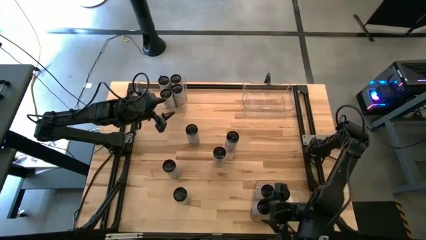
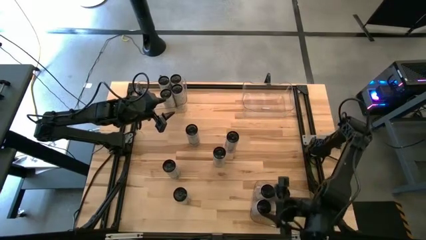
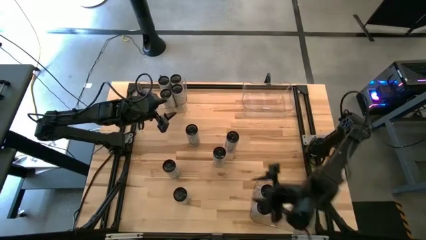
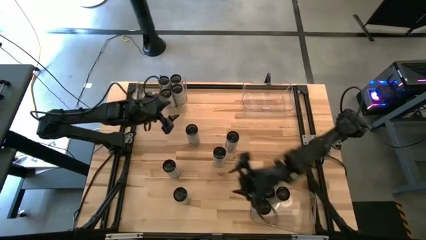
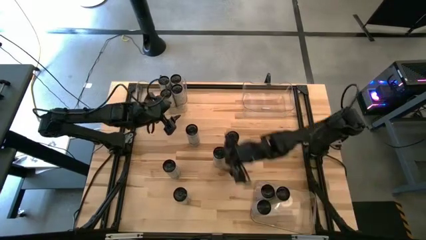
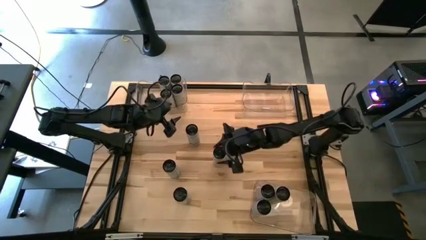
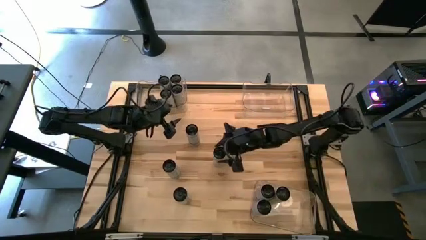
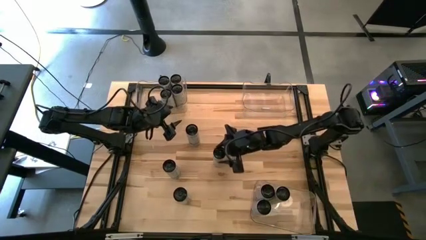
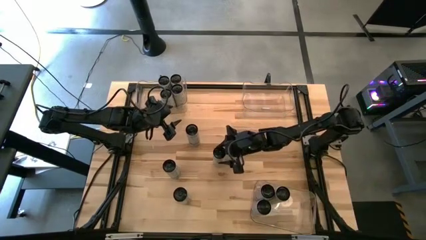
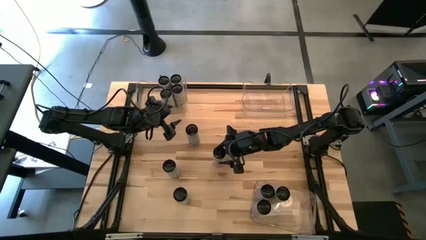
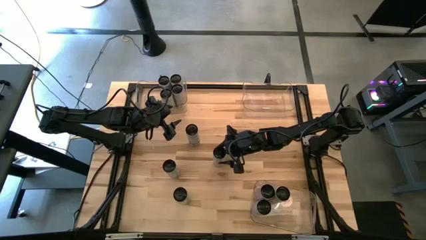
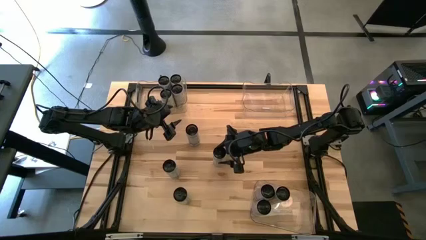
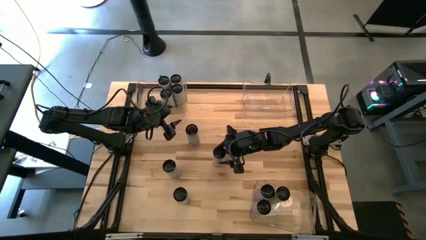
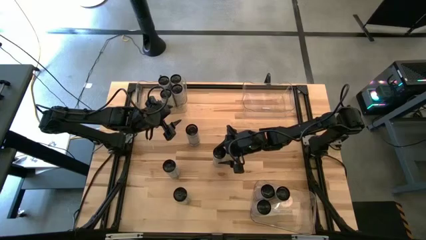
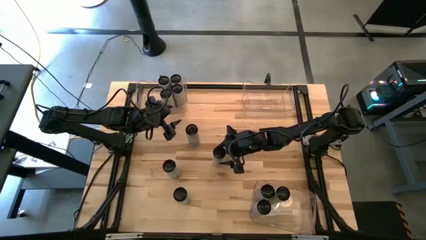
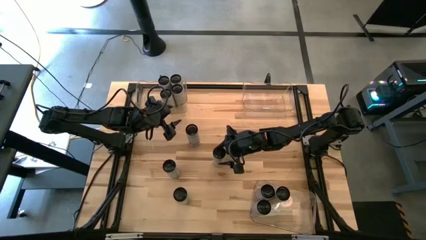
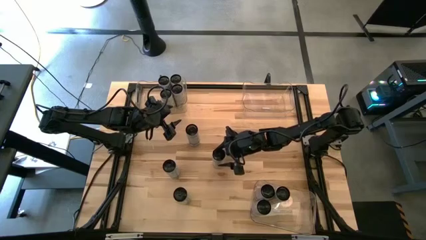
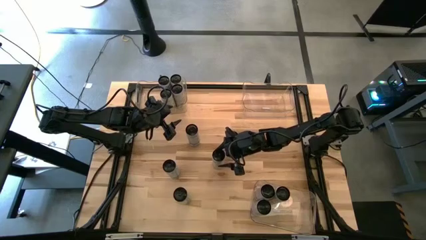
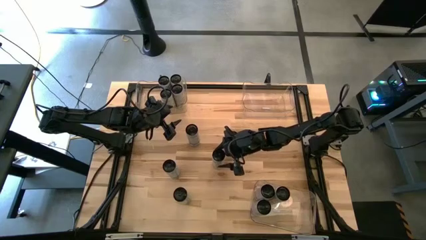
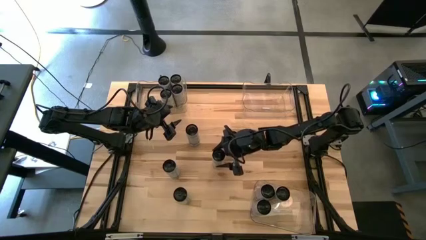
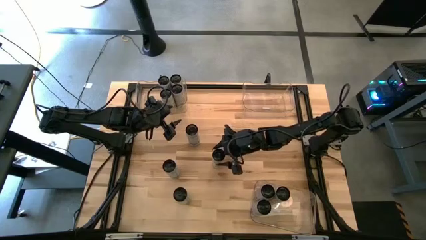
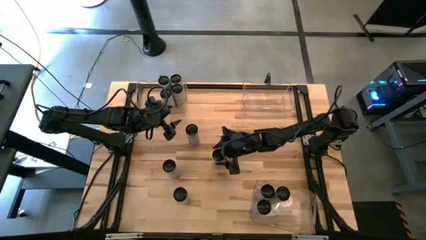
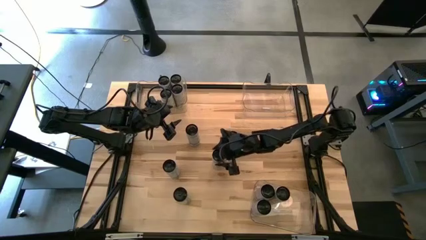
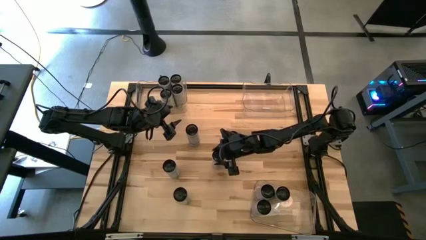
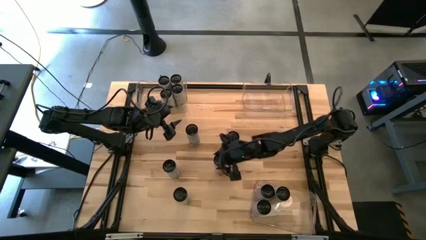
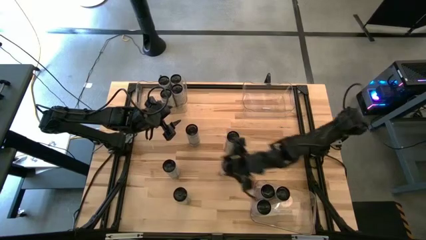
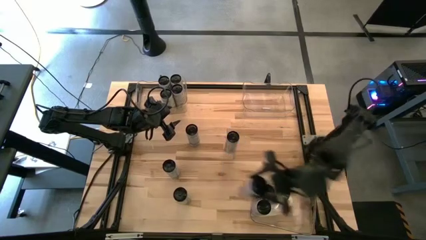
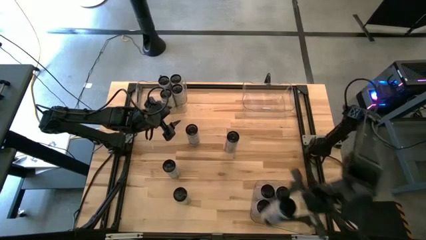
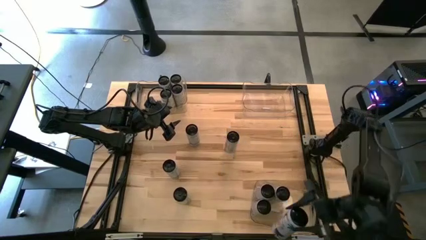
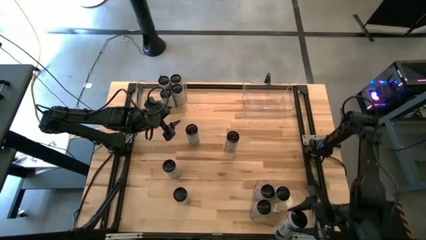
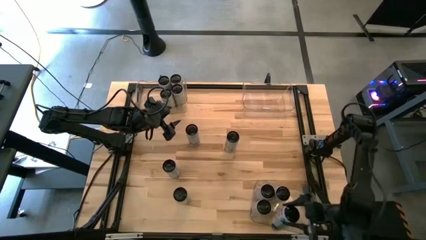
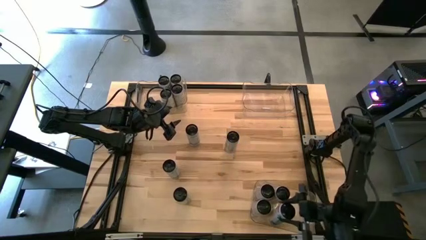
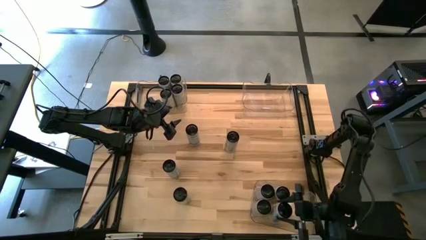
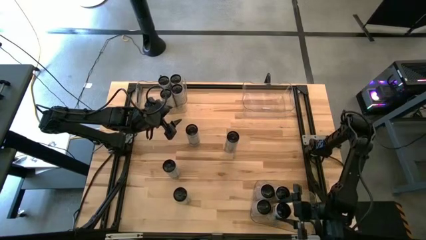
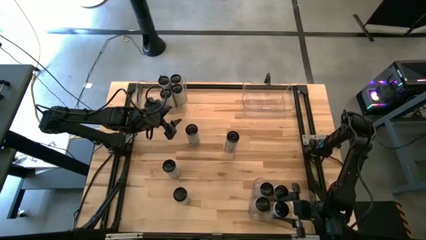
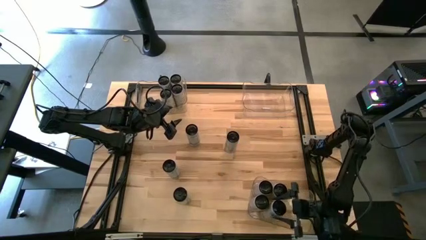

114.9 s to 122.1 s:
Task: Sort soda cans
Put the white-pink soda can into the bottom right transparent bin

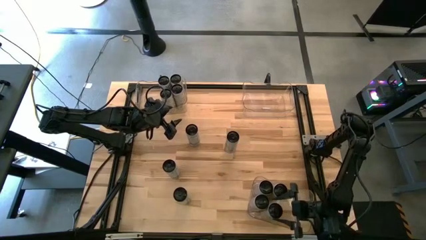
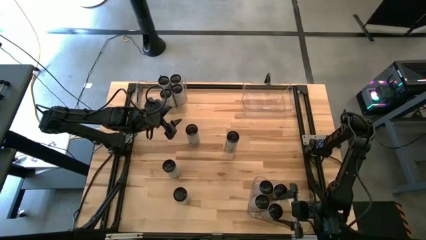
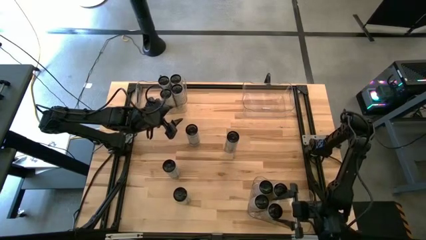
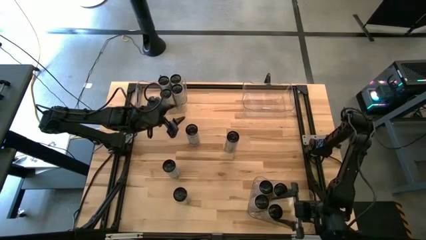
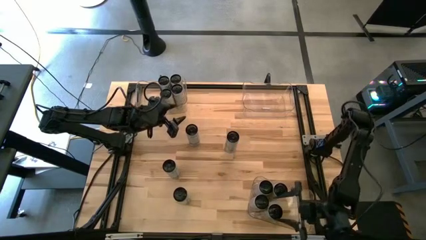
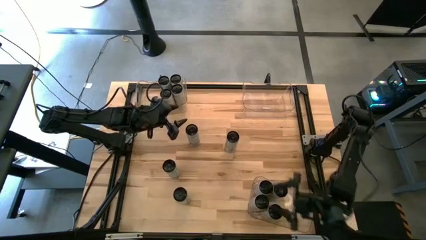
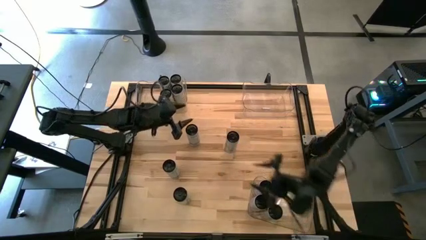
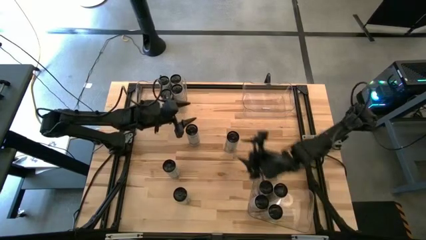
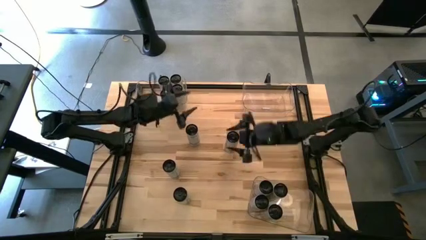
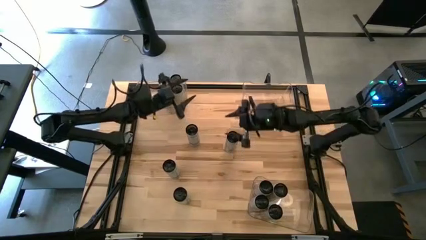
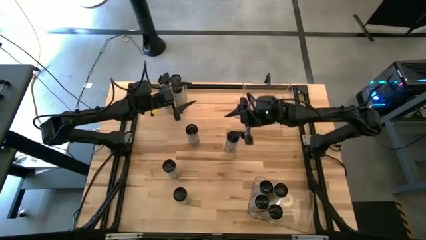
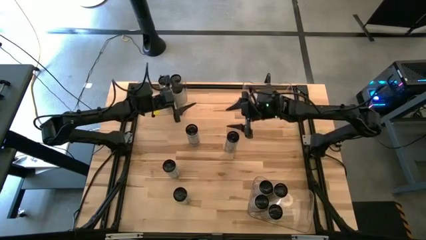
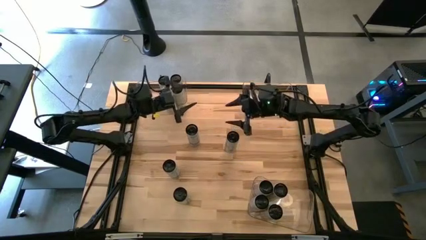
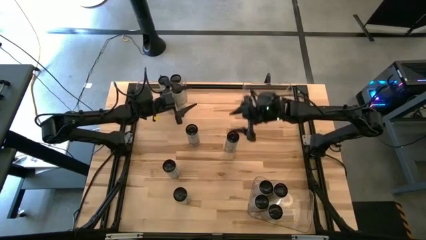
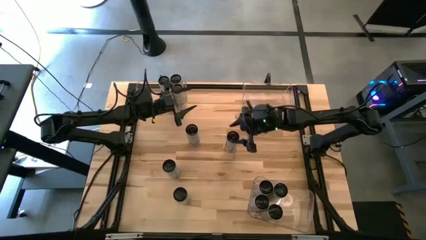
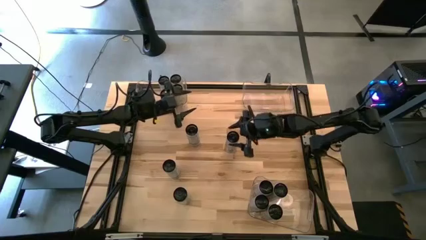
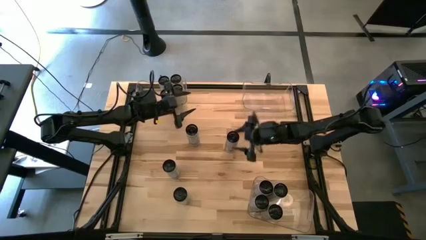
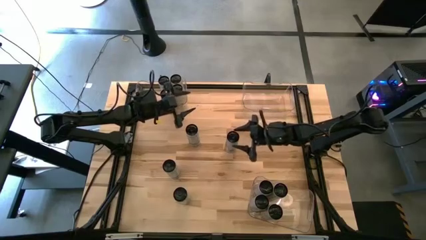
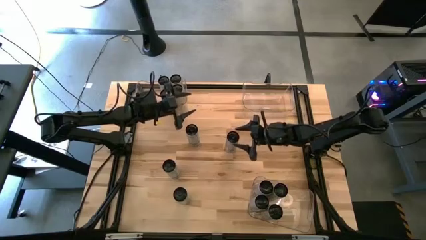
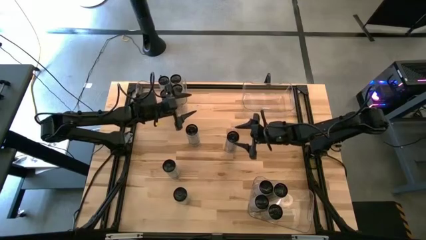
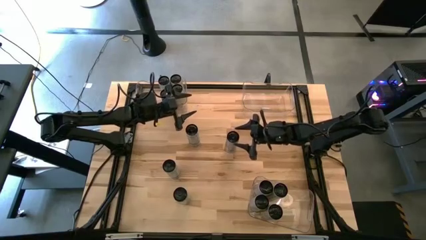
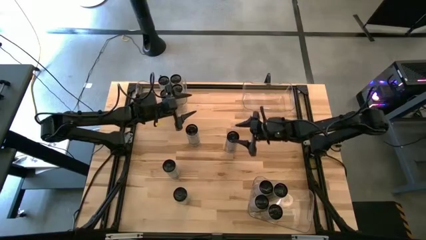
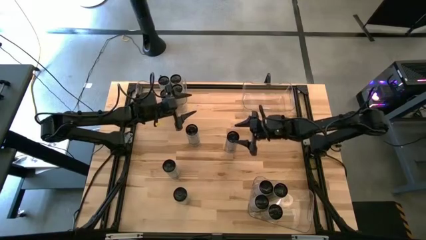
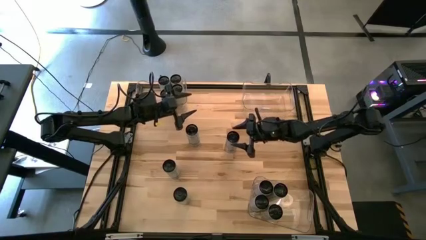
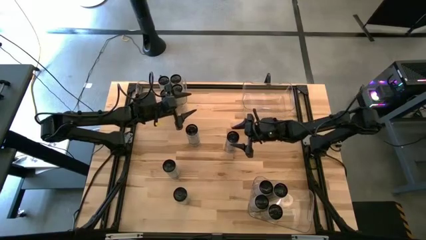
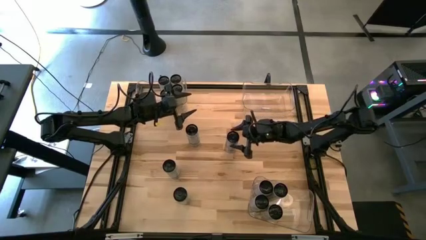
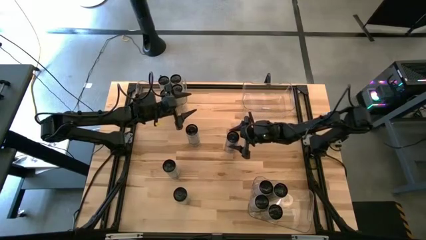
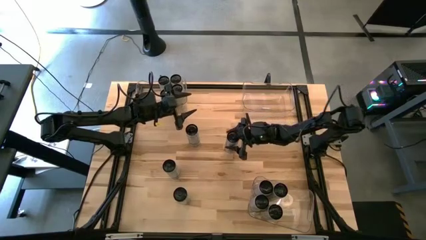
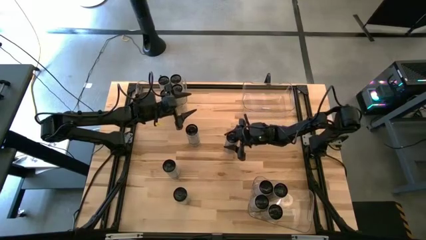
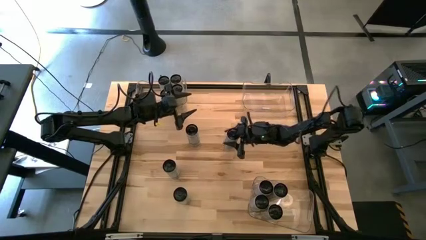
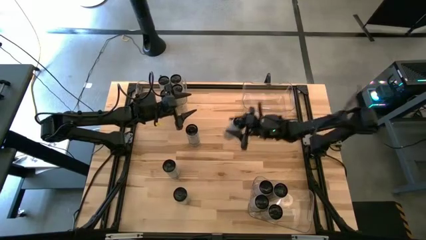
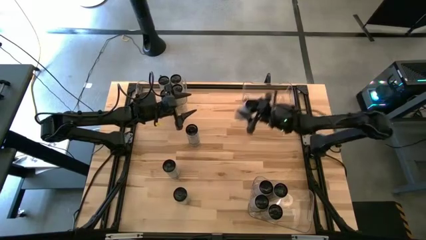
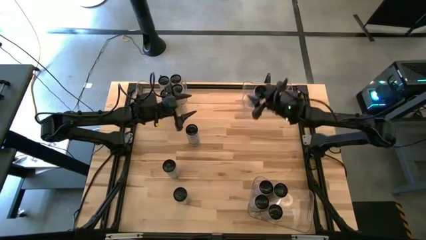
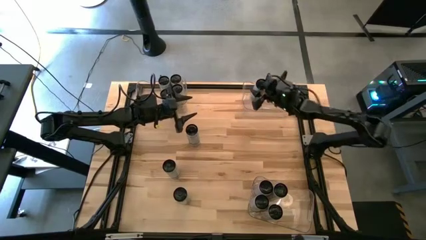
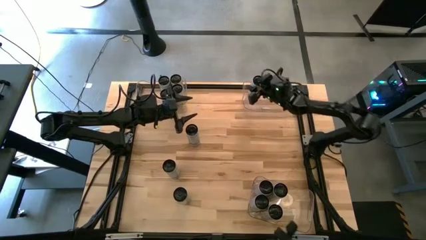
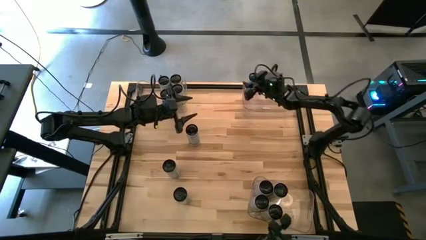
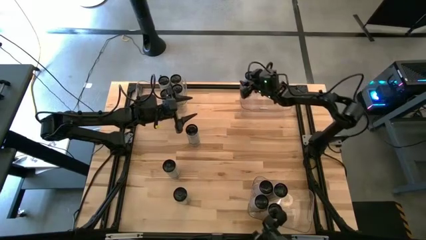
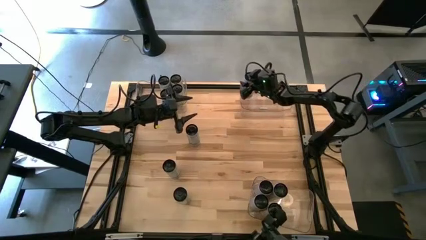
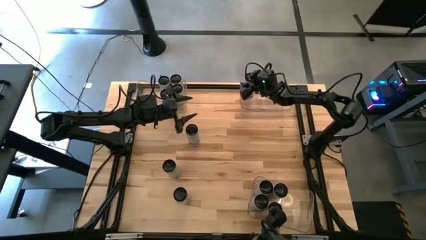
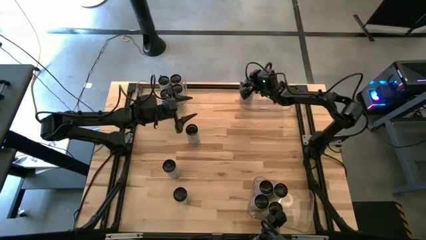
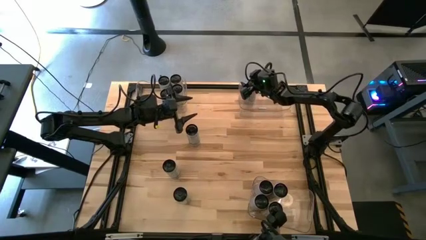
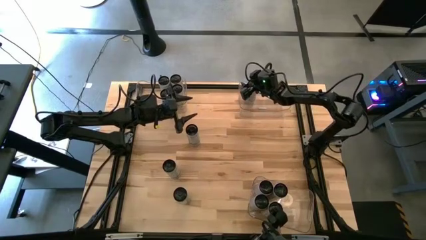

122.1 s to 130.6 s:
Put the white-blue soda can into the top right transparent bin

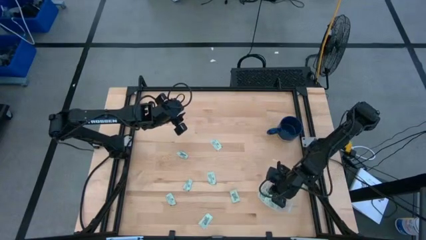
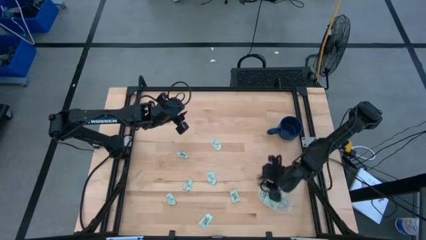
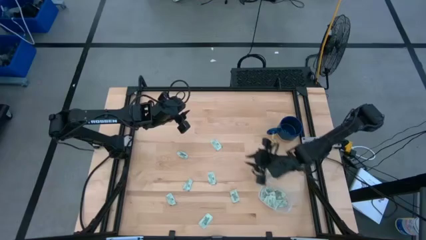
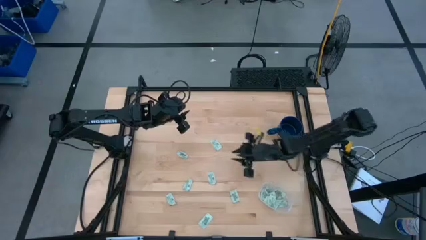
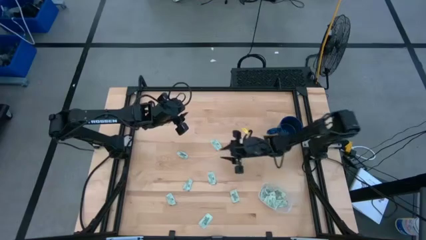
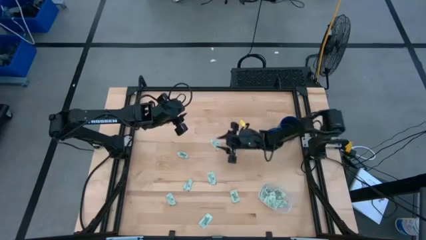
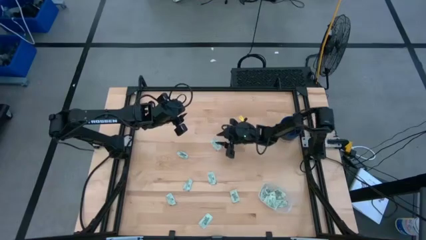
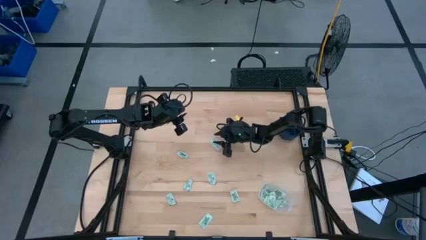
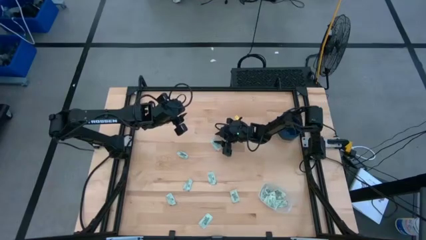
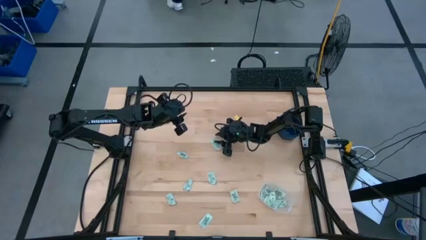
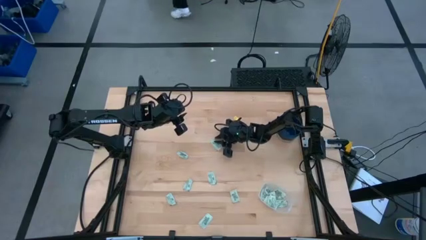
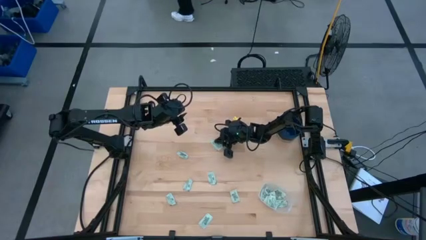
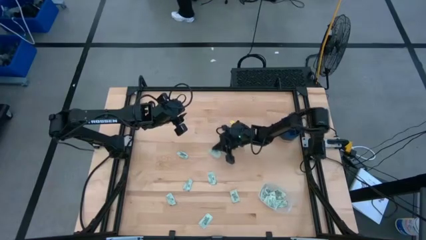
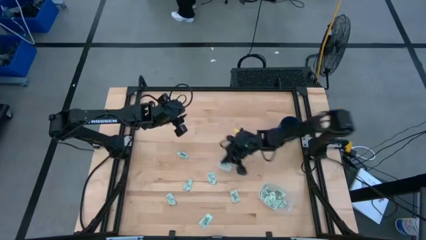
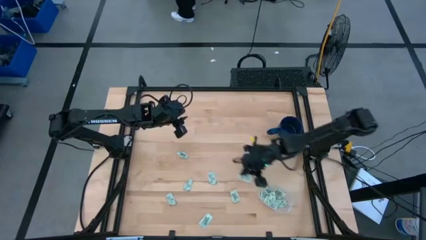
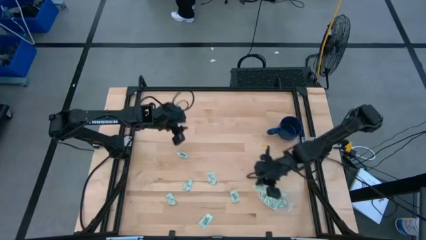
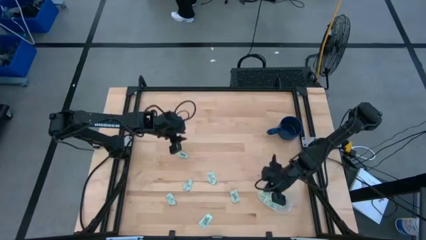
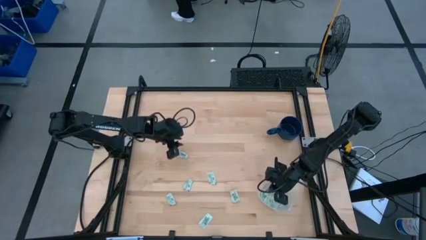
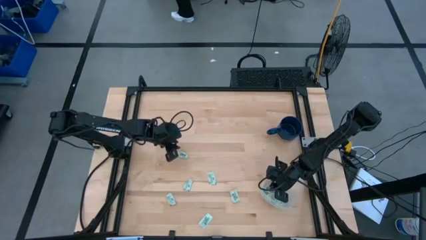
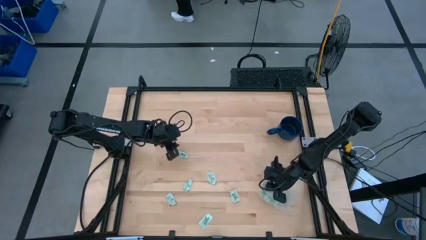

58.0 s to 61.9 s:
Task: Pick and place Stevia / Truvia into bins
Put the stevia packet into the transparent container
